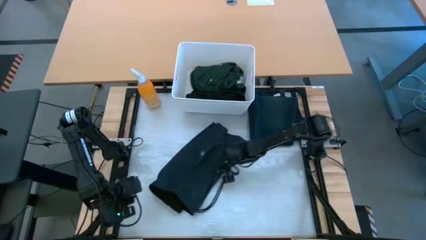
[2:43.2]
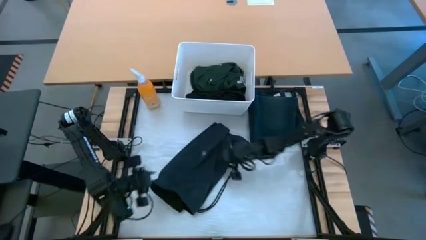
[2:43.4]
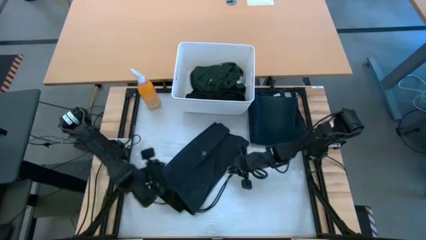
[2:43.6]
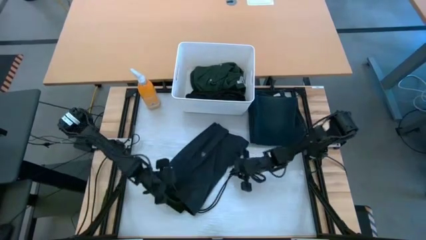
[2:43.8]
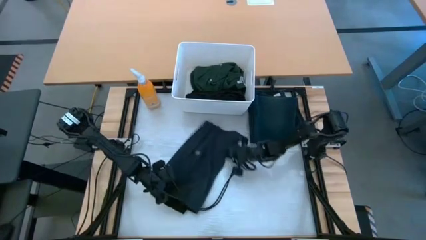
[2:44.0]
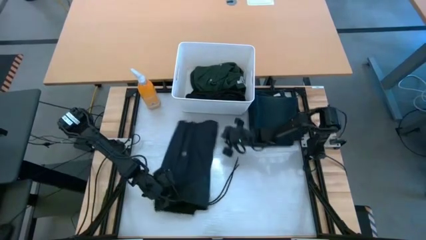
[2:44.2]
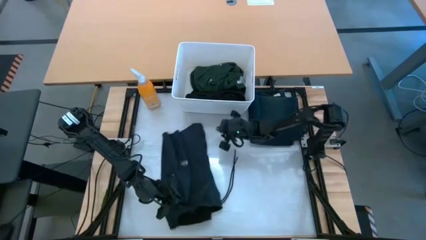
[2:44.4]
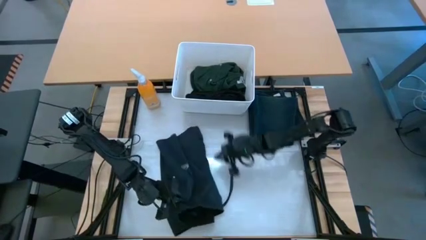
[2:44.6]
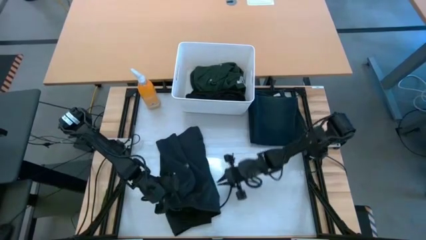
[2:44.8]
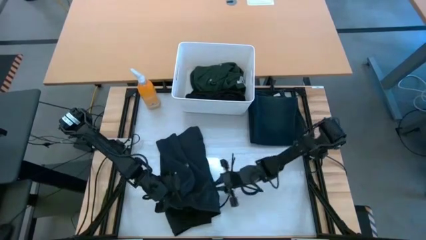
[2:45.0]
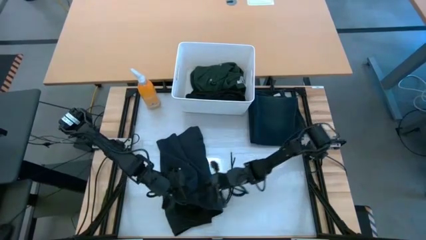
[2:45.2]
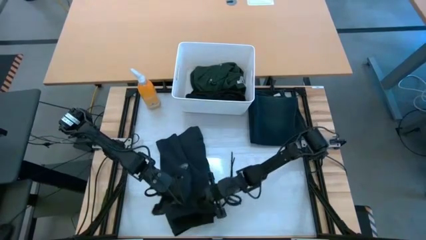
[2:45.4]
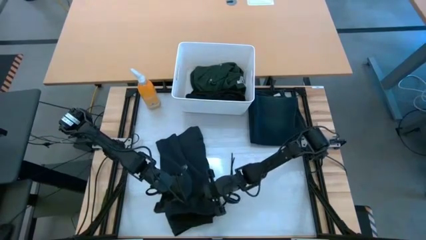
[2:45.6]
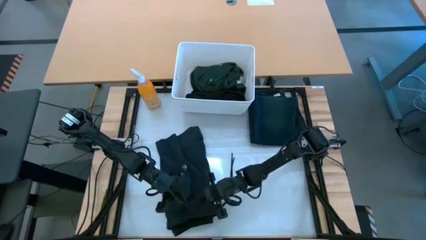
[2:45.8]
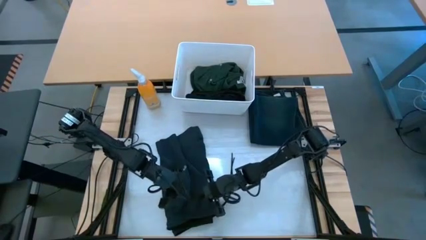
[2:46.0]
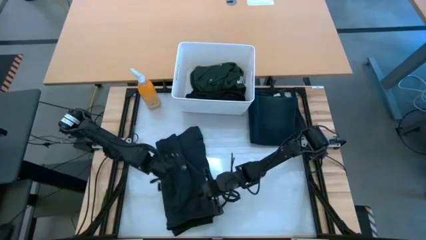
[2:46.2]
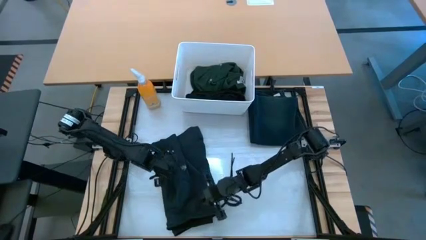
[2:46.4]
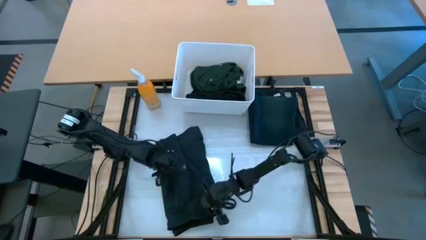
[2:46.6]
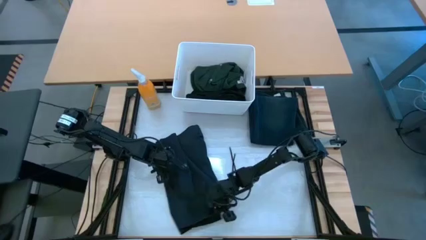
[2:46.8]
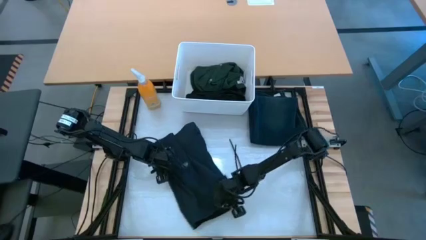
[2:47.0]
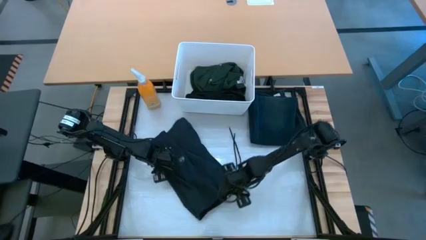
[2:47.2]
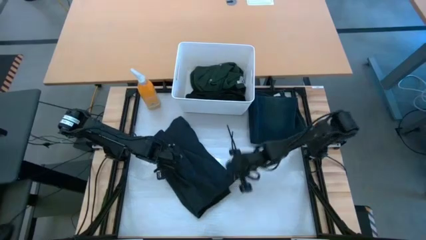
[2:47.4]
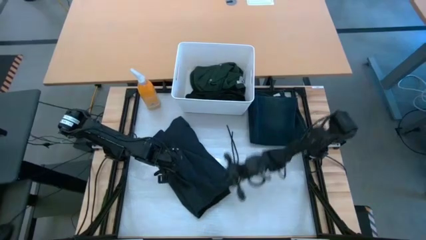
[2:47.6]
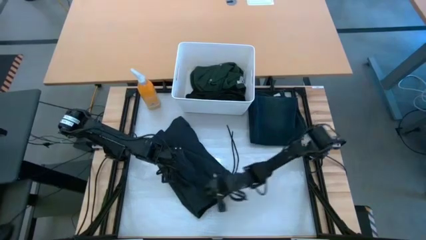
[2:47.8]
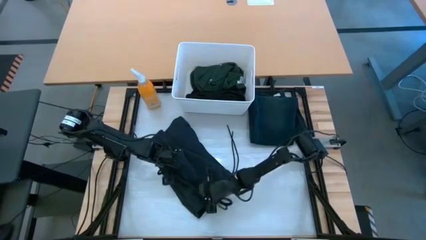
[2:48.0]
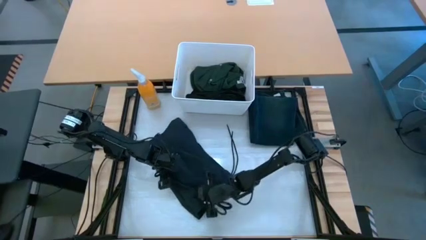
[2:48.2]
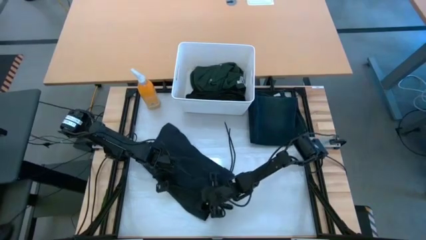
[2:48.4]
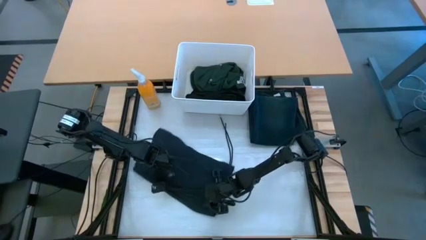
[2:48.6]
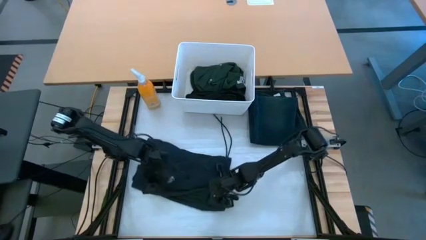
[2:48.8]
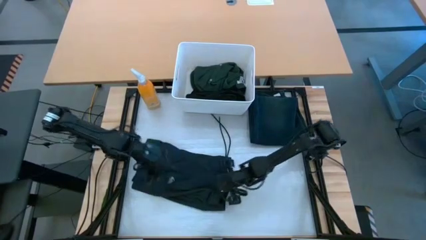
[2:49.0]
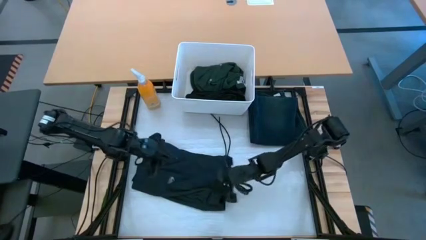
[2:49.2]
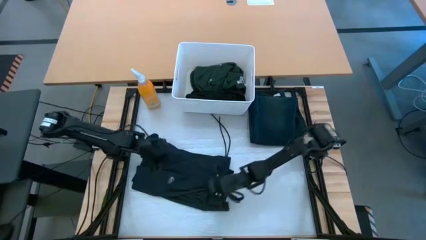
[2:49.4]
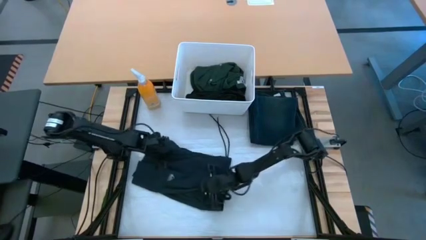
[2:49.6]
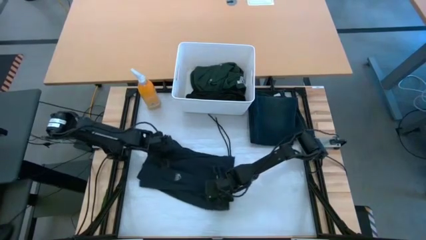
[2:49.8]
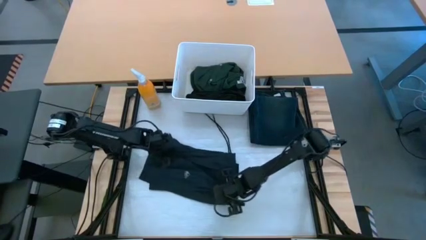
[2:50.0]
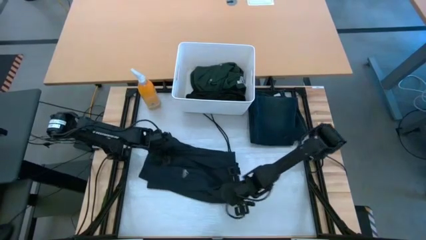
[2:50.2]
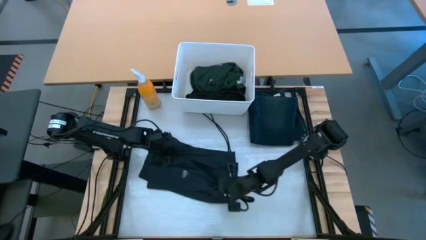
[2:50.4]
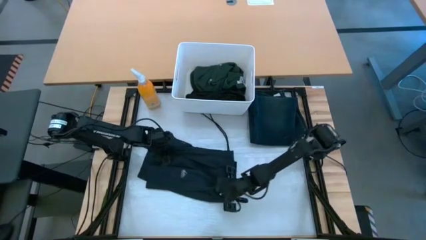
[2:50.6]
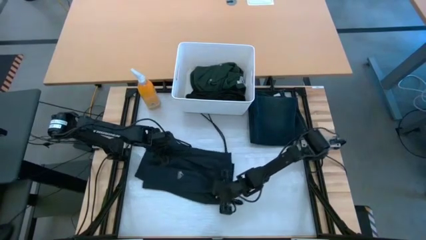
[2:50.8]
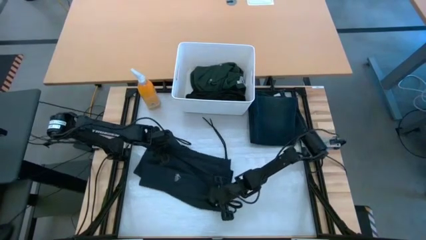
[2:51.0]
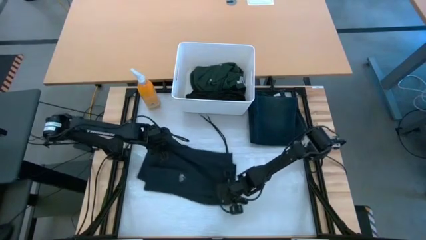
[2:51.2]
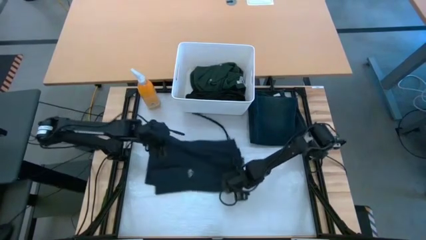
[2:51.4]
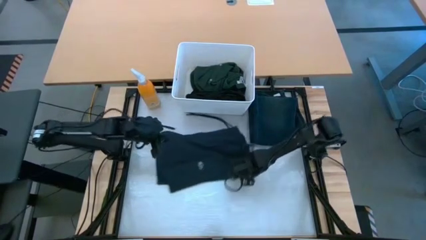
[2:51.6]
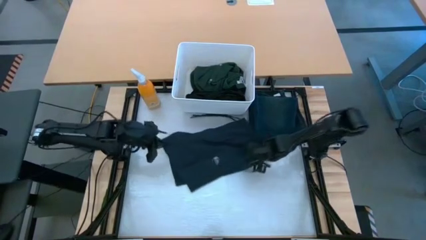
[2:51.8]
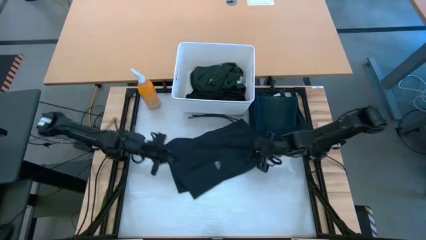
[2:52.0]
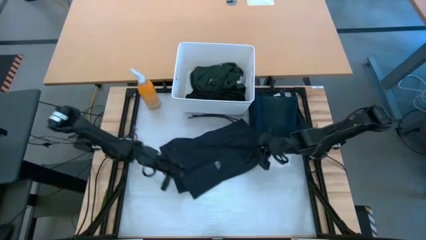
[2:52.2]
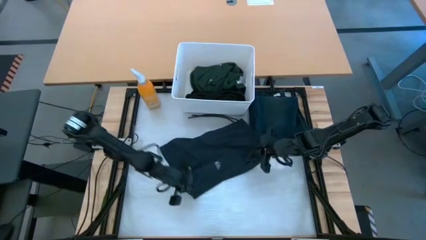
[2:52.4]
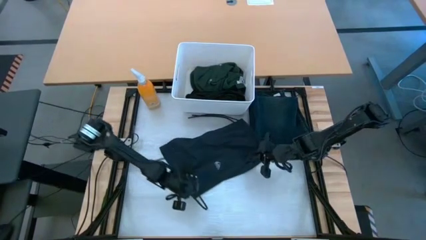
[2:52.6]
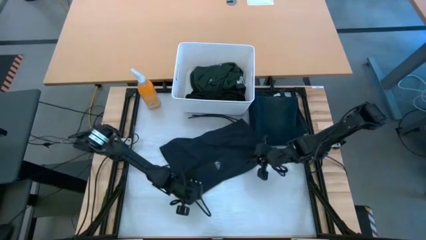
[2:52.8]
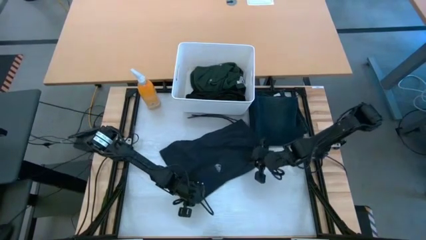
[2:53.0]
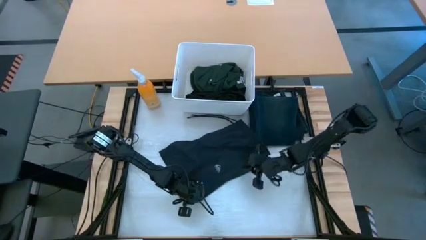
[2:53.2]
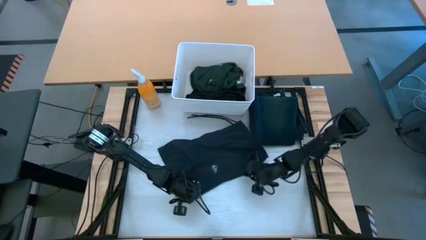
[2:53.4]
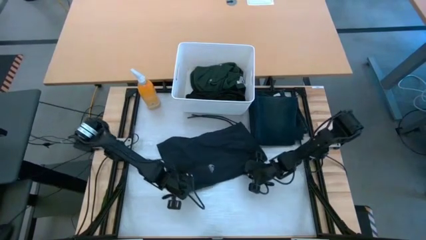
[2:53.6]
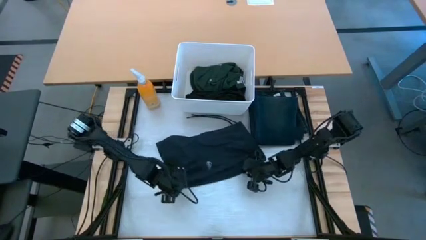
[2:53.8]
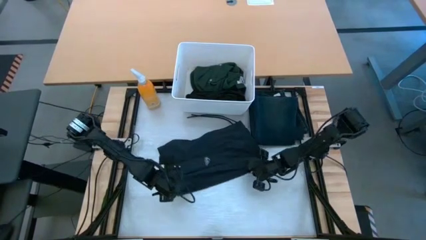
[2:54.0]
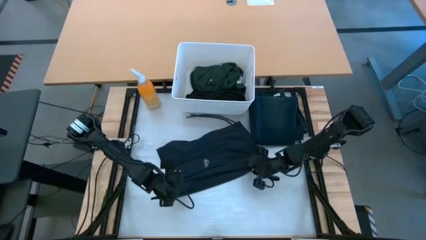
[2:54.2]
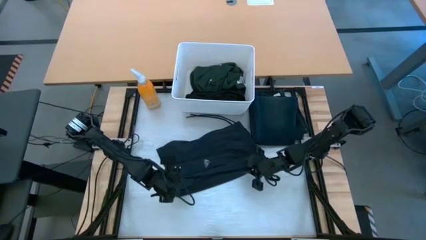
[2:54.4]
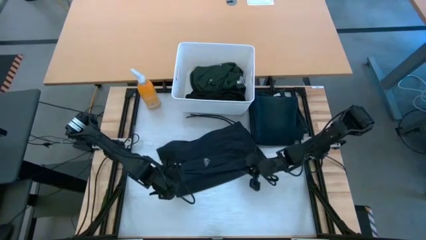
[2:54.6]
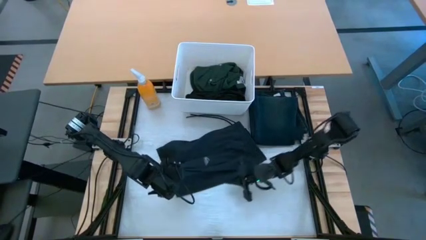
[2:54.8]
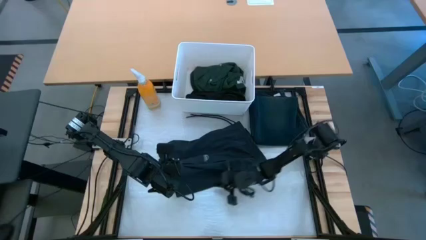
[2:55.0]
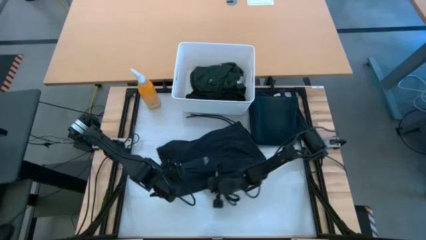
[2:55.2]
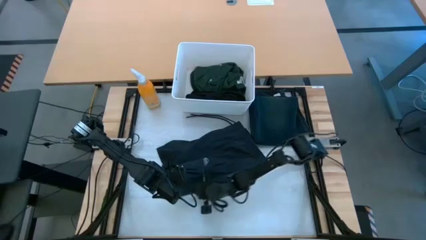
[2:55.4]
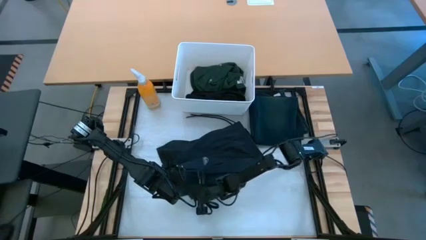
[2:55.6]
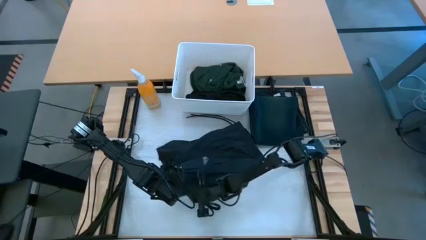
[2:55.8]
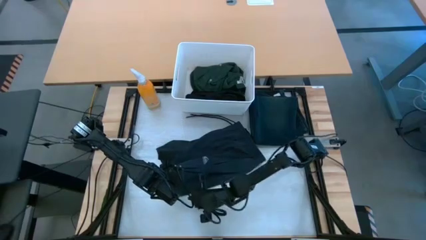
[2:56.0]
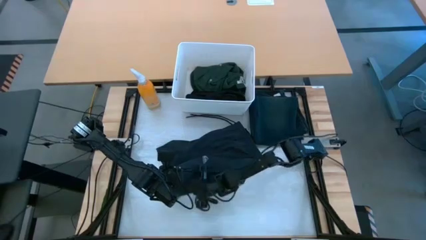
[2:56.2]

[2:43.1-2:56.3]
Task: Fold laundry
Fold the black shorts

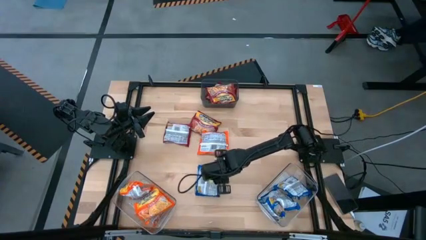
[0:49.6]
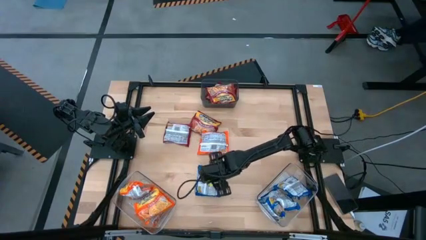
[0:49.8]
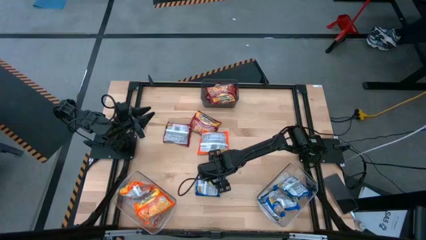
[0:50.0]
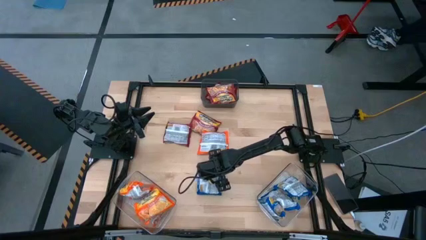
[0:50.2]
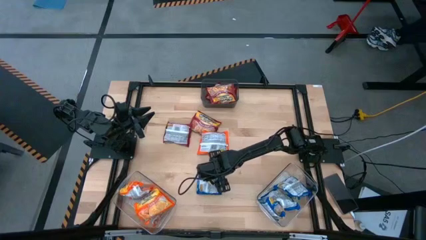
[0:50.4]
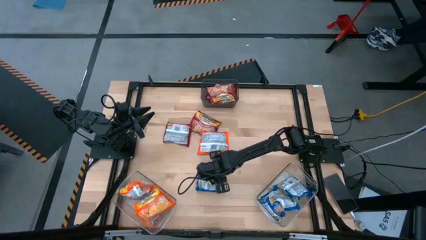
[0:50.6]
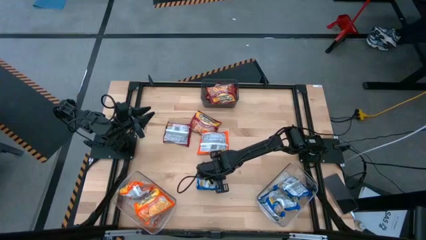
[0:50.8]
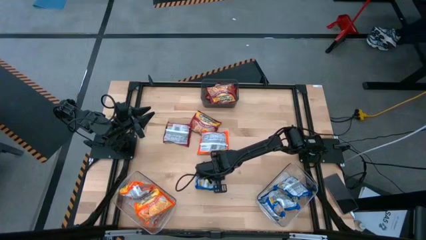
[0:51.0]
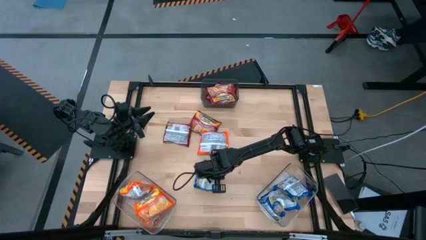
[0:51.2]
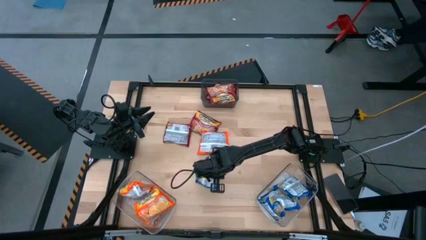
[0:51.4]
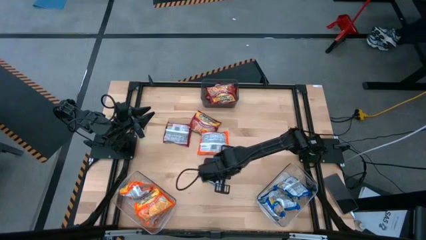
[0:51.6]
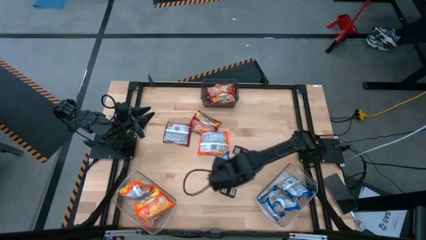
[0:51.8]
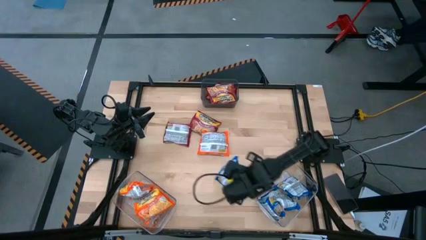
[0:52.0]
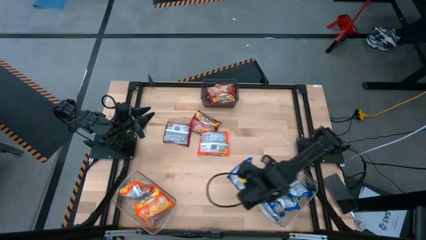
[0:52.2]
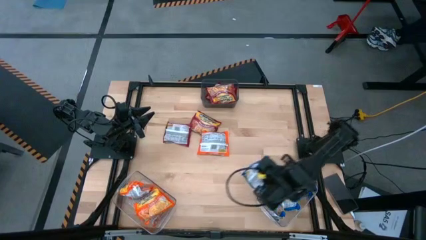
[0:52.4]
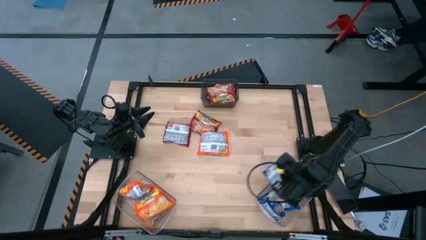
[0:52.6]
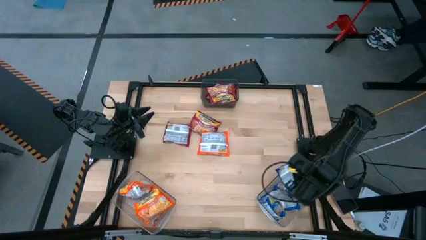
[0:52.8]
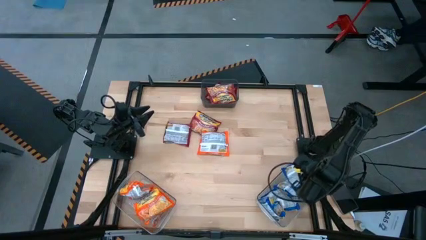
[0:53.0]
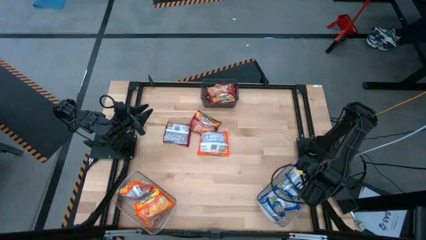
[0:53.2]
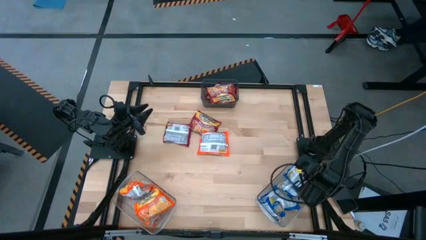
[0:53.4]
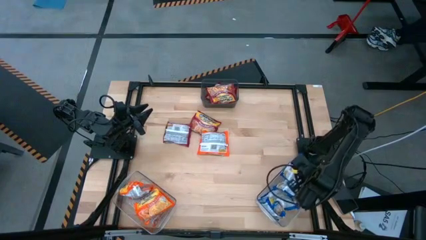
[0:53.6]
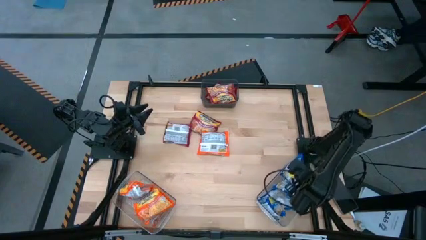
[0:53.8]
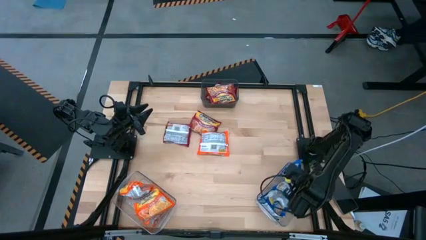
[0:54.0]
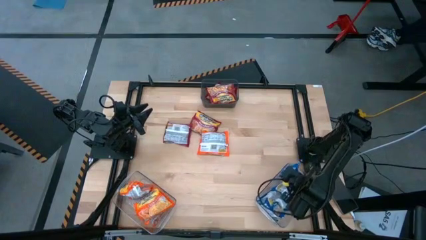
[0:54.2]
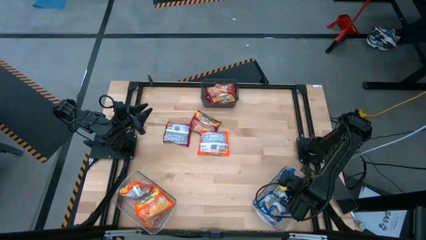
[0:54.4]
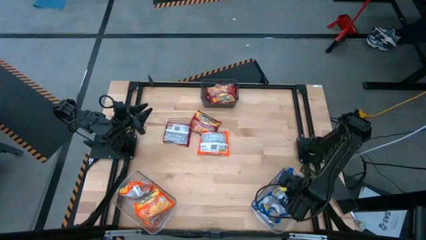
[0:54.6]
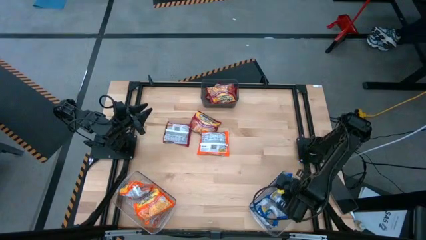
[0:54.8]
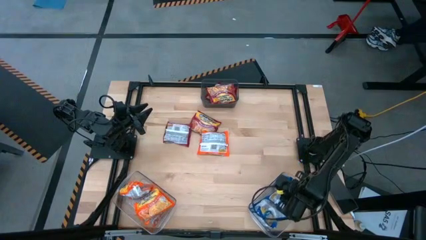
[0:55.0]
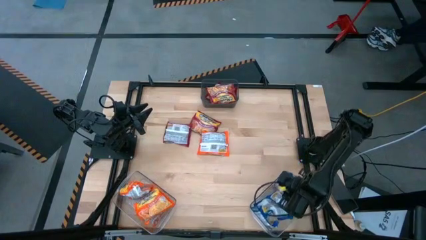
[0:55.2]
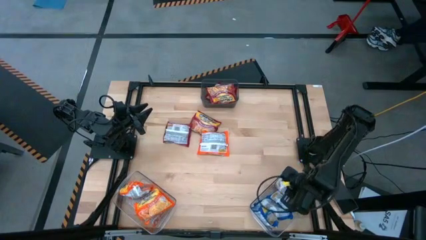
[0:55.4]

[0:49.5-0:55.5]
Task: Sort Maruchan noodles
Put the blue noodle pack into the right transparent bin
